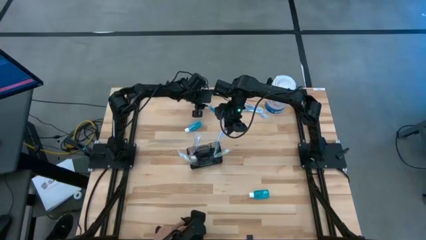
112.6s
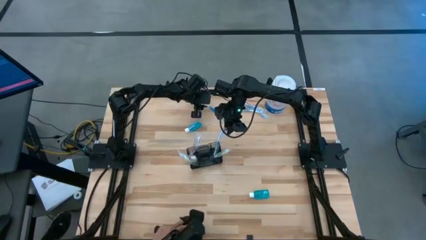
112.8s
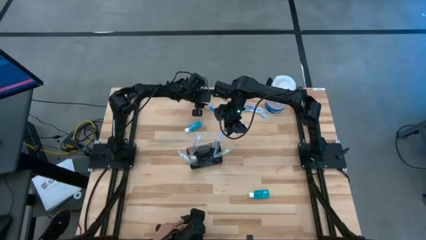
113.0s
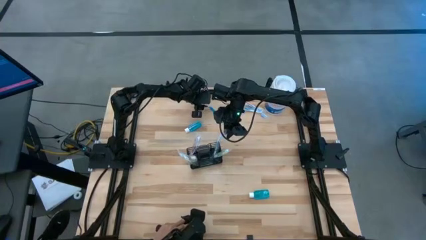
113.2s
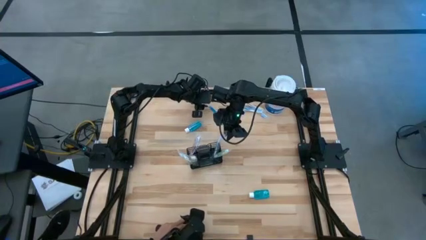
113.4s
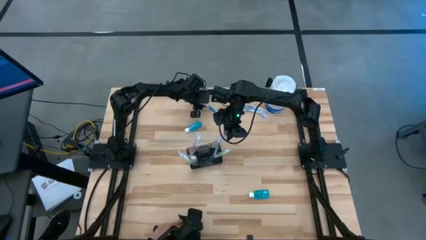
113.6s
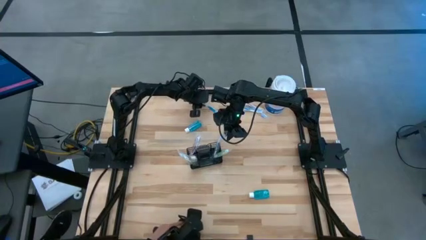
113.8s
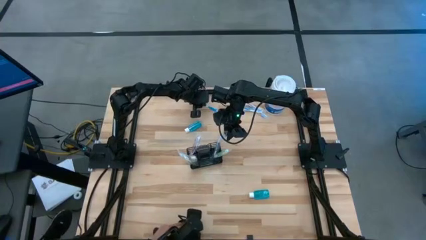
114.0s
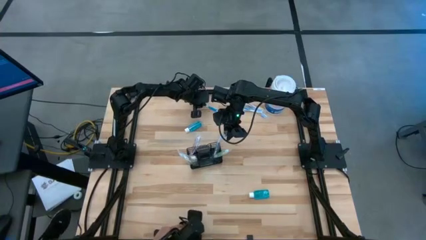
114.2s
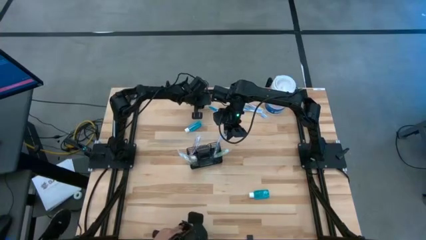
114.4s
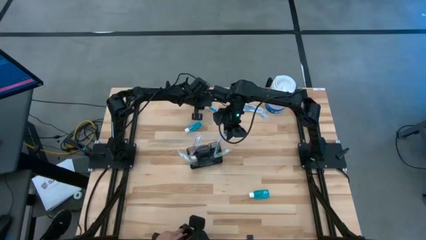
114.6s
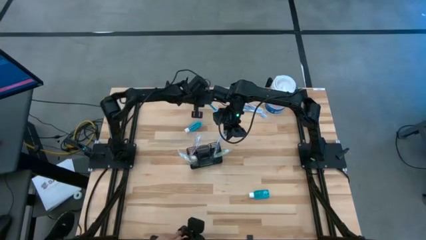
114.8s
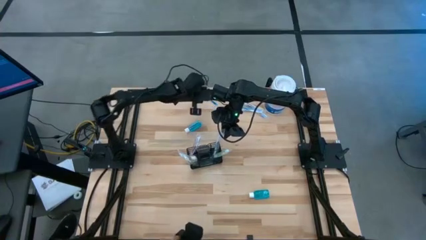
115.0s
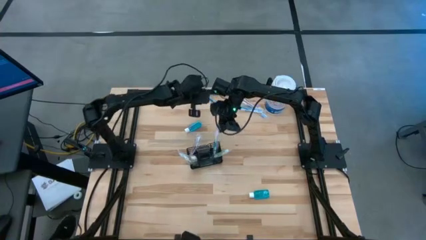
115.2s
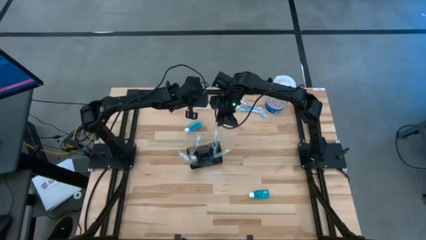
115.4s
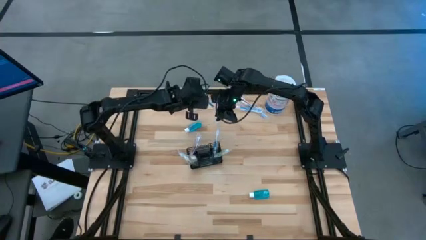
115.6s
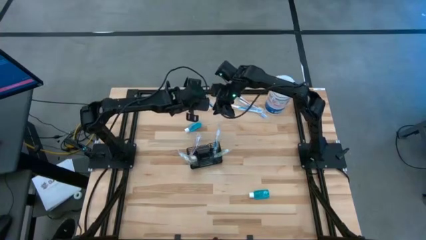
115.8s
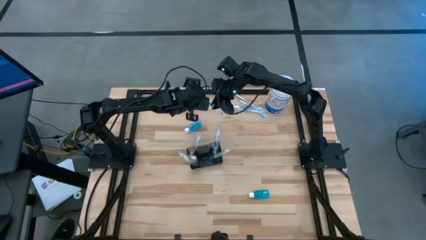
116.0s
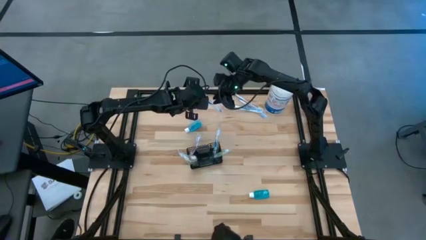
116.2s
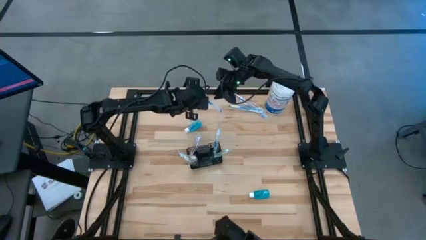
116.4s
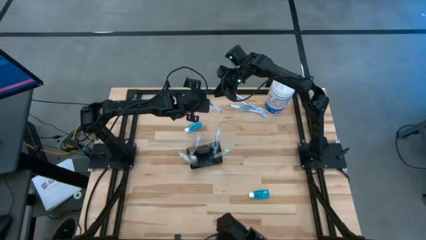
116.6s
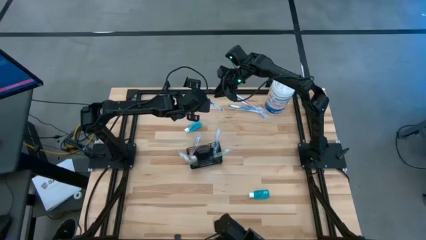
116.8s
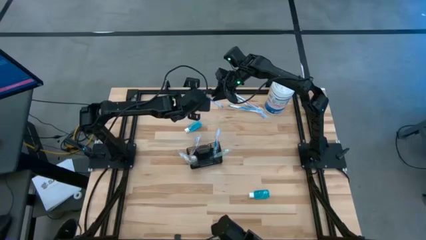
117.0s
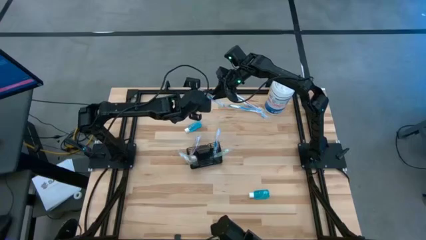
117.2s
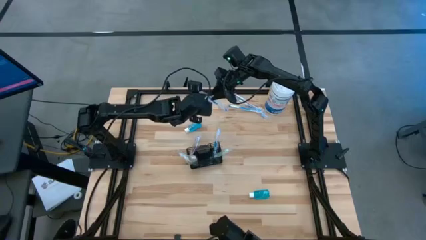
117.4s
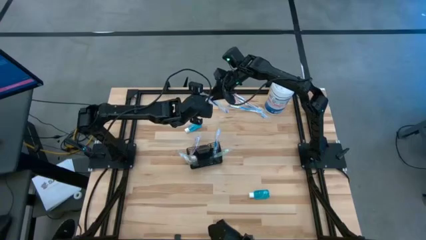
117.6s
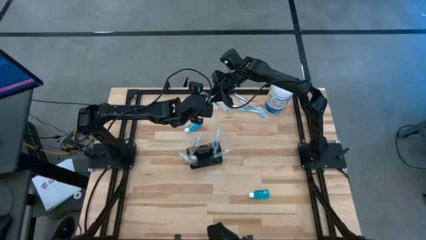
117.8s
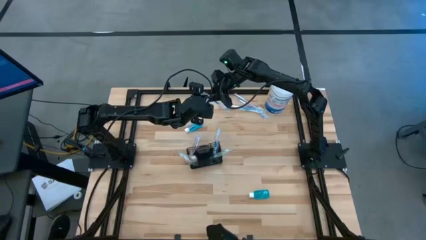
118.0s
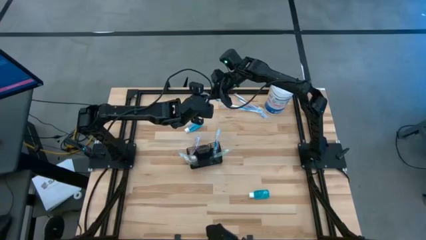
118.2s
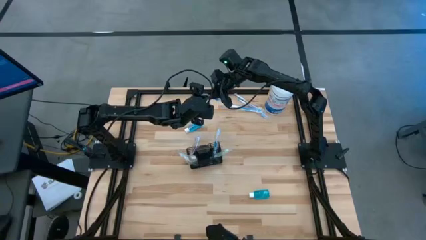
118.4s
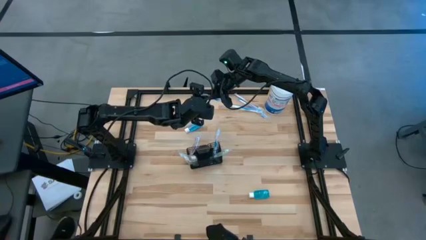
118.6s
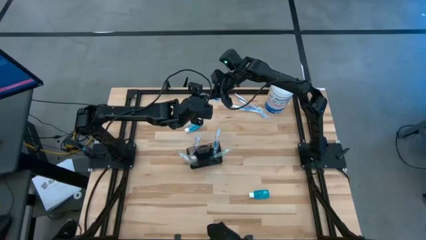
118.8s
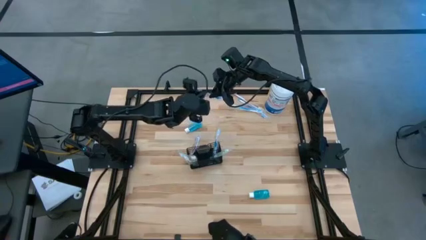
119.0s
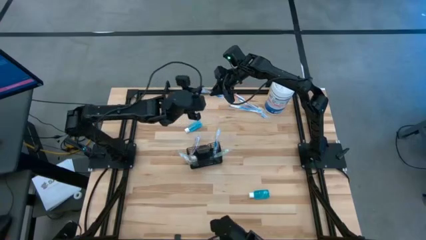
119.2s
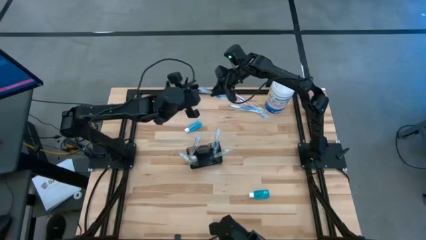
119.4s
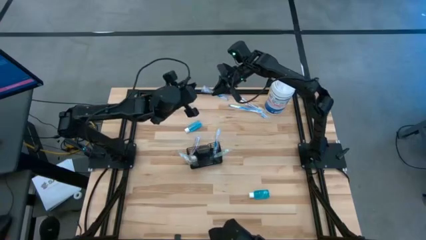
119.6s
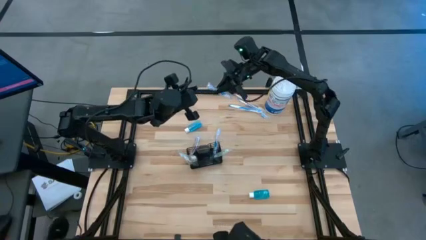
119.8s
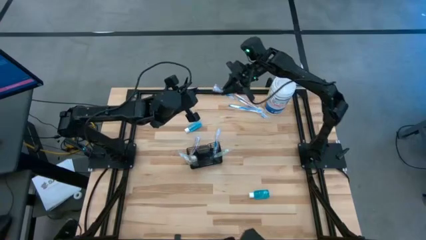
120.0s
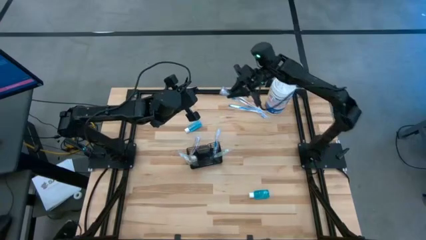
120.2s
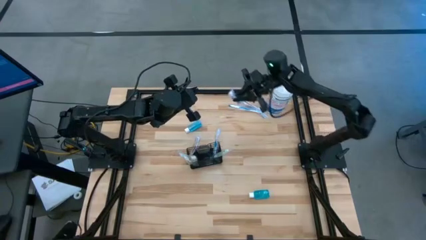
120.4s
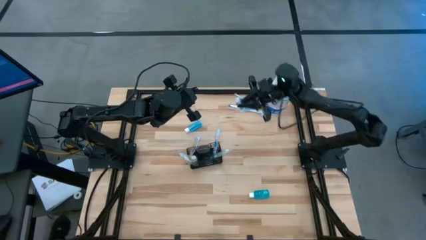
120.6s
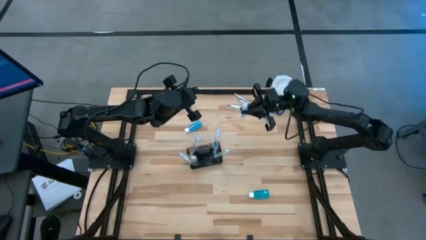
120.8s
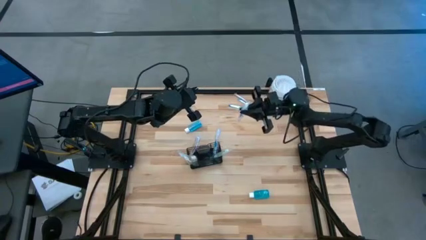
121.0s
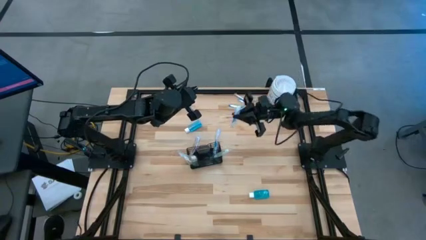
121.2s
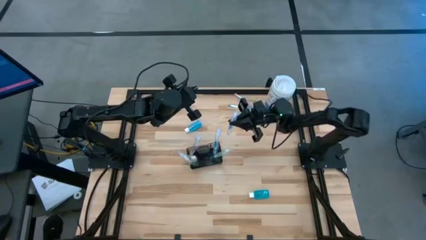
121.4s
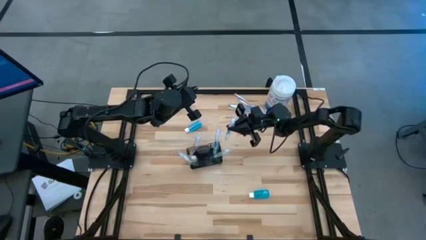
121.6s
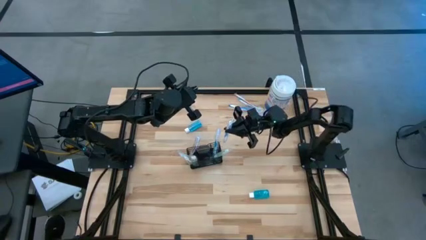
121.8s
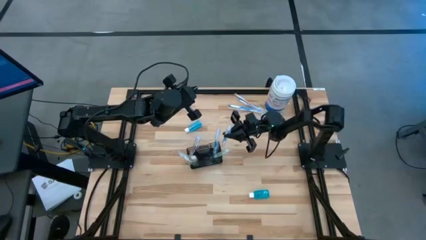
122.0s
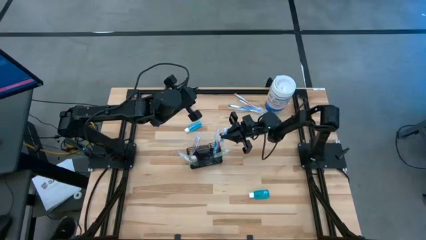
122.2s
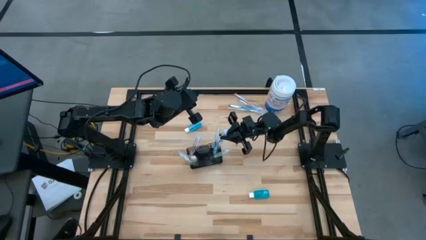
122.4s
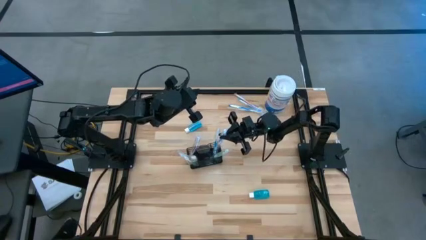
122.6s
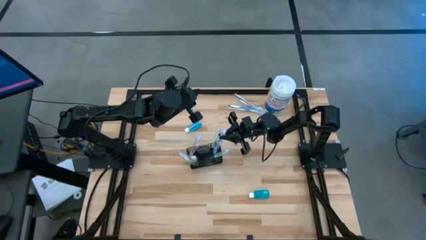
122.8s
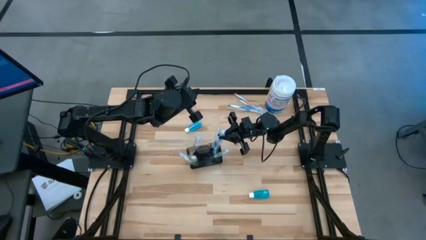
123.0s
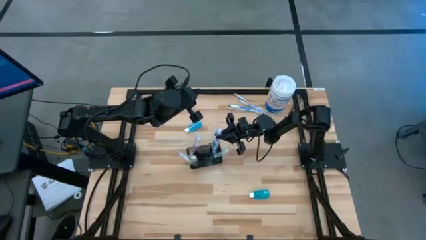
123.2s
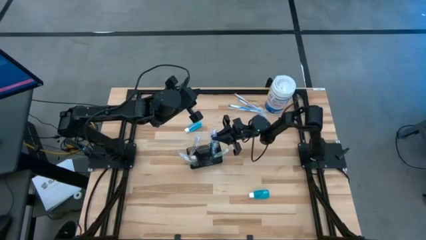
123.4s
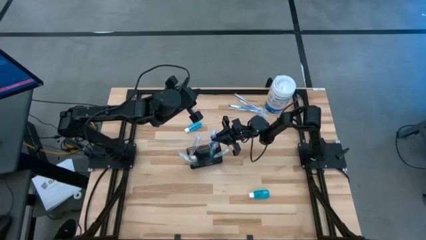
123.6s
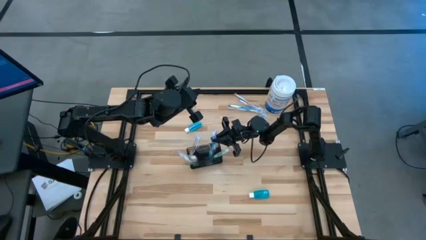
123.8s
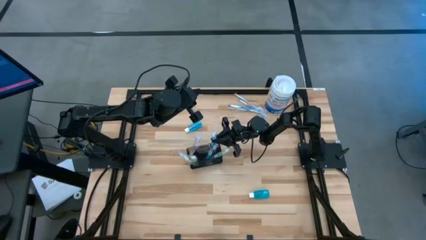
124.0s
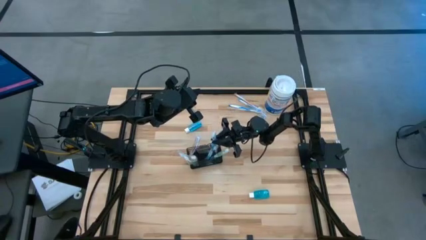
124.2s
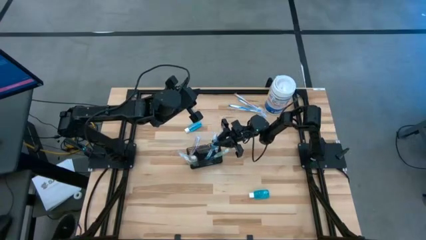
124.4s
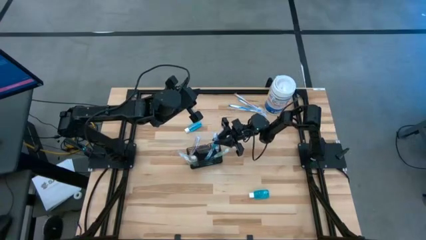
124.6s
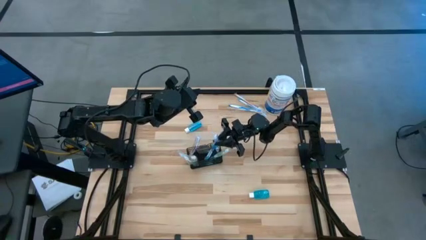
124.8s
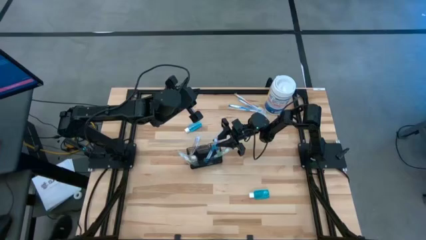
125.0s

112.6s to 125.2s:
Task: Pick & Place toothbrushing station
Put the blue toothbrush into the wire organizer

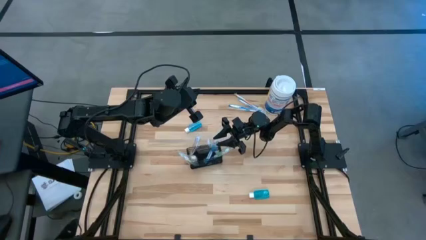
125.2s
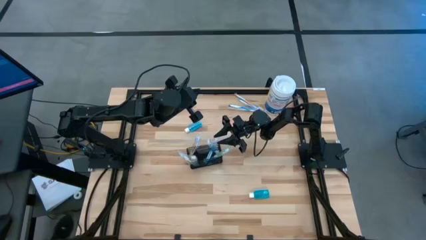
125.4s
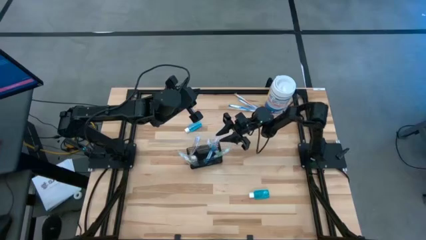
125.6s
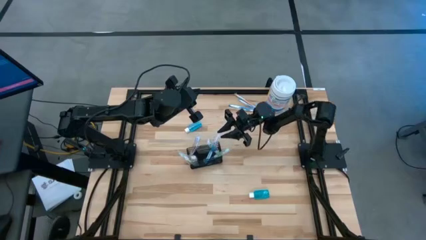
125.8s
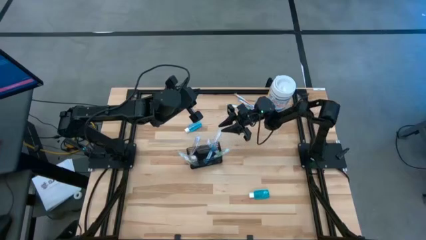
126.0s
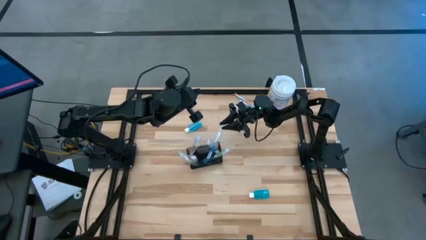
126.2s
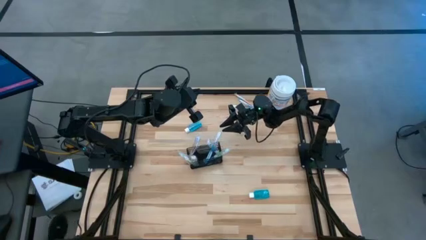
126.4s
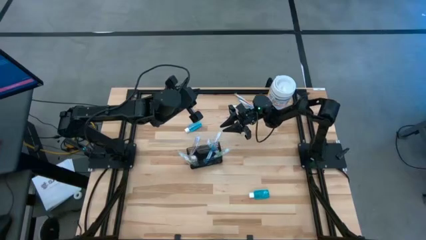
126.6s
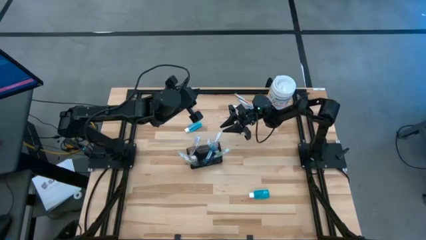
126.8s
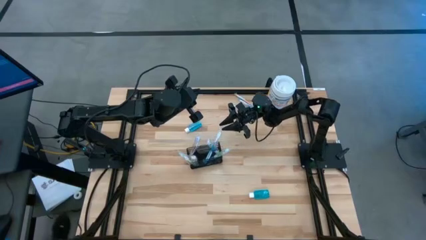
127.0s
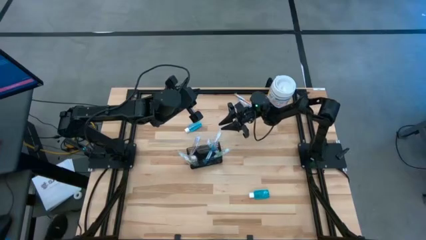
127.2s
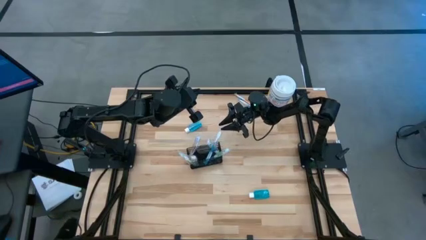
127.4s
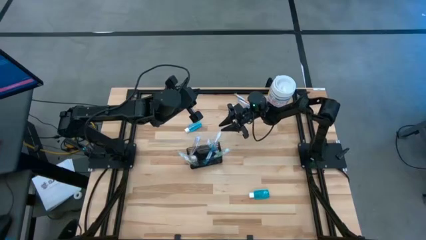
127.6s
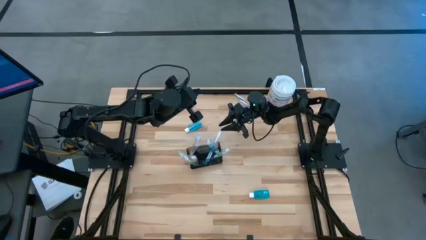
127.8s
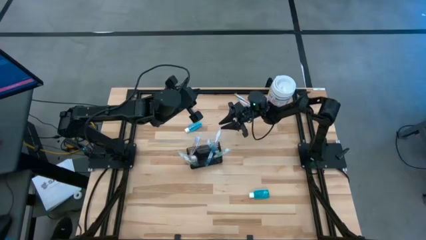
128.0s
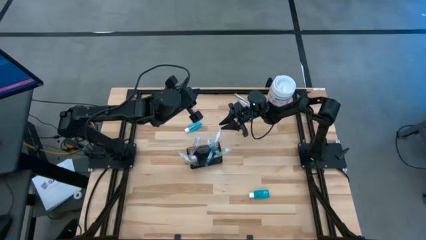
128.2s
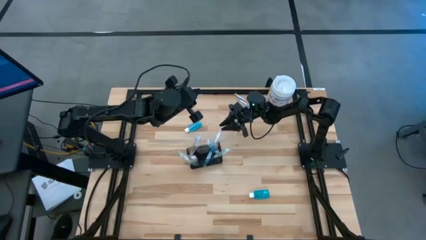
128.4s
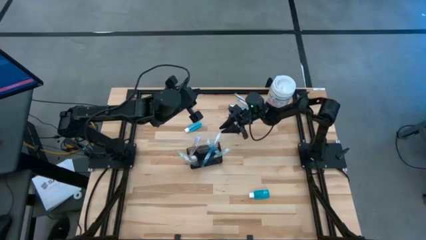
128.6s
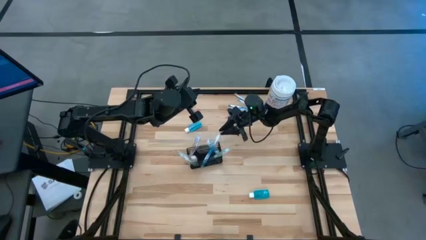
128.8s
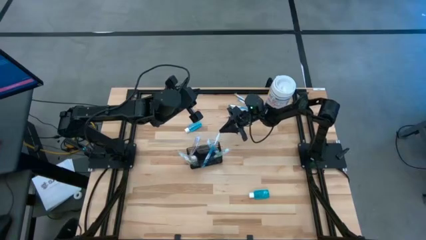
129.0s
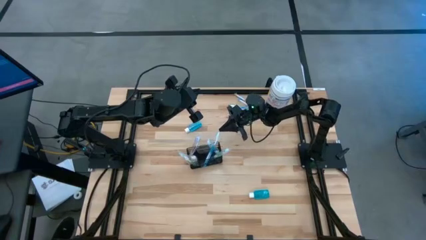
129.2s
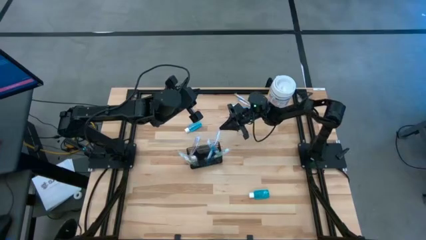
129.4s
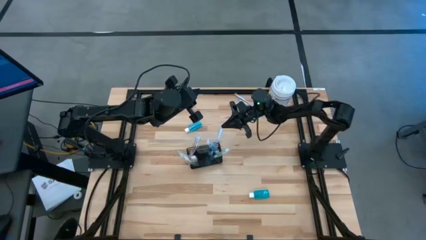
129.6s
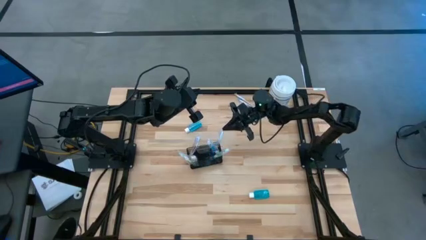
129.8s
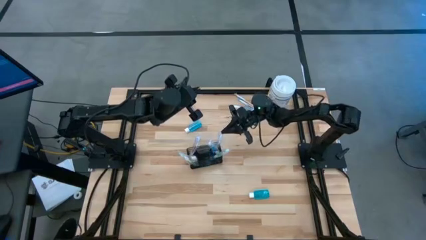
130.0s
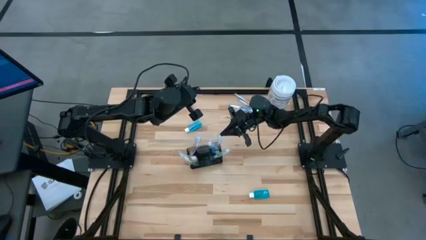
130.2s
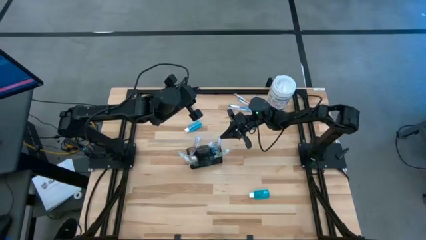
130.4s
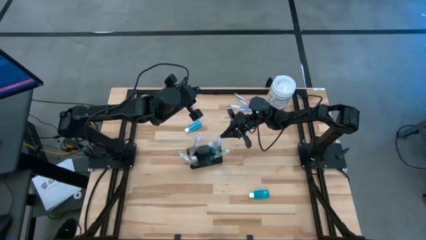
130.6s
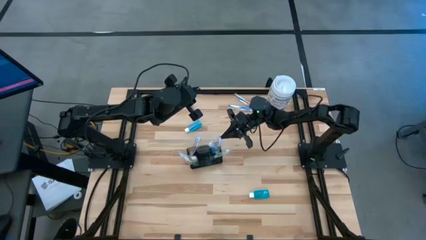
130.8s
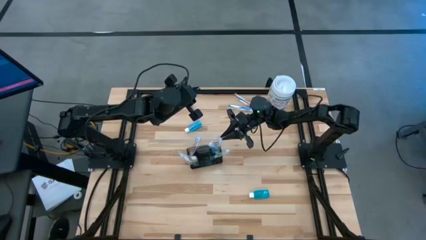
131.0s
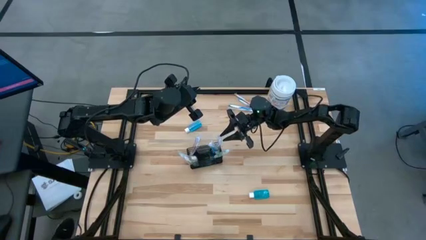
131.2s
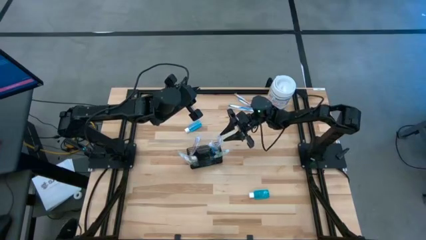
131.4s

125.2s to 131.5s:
Adjust the blue toothbrush
